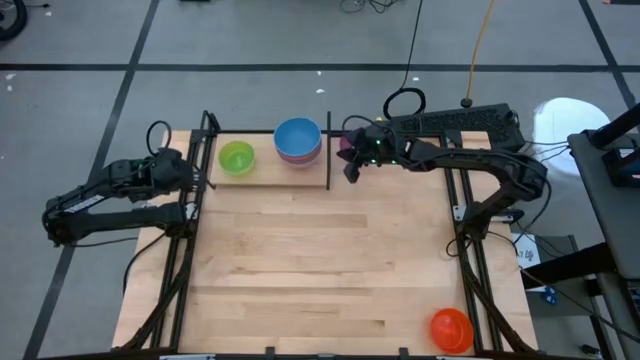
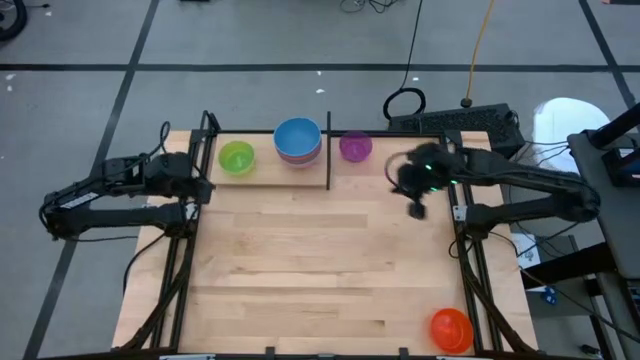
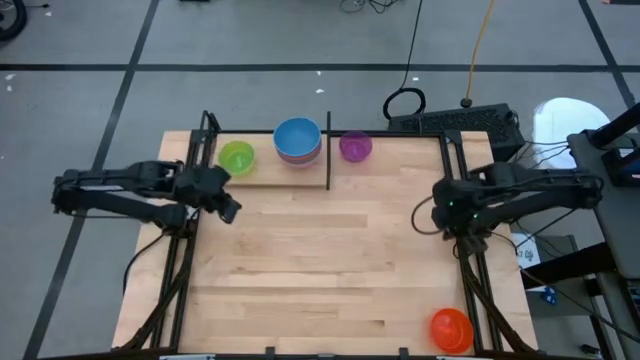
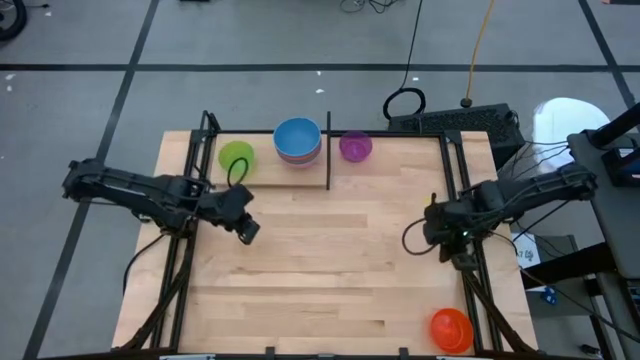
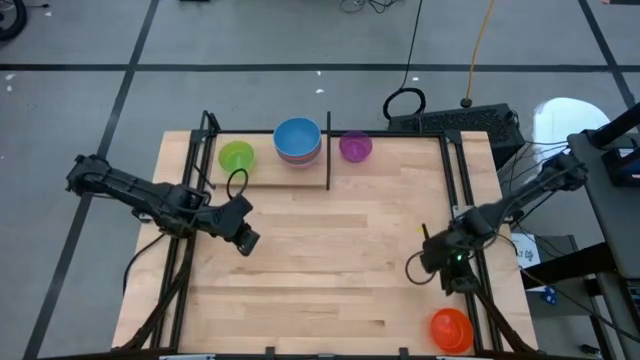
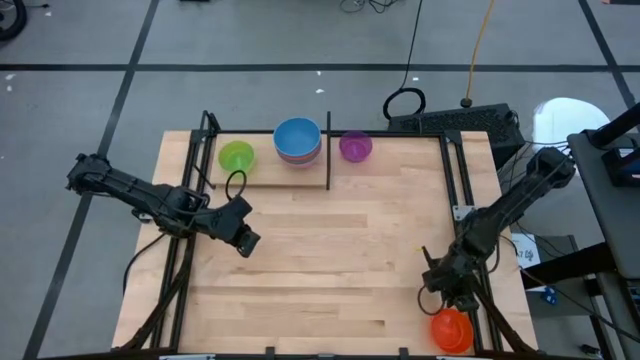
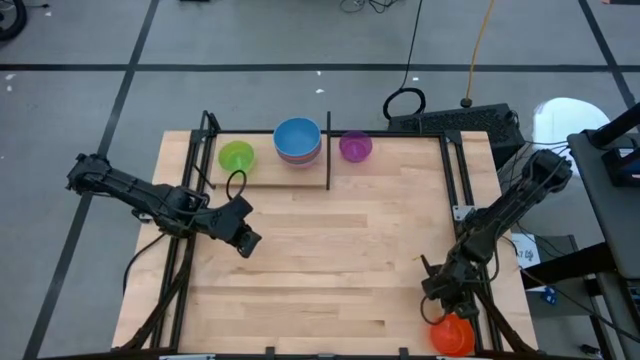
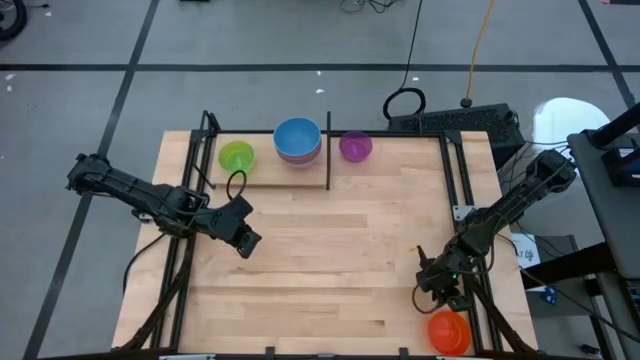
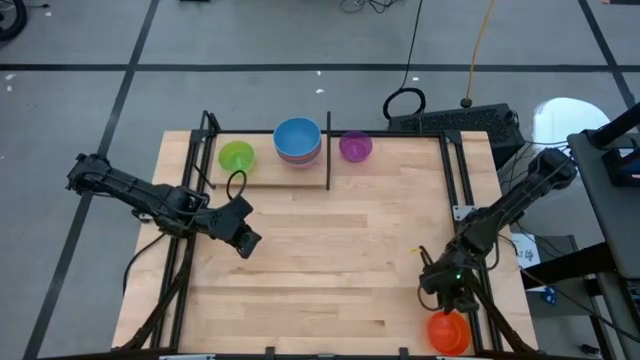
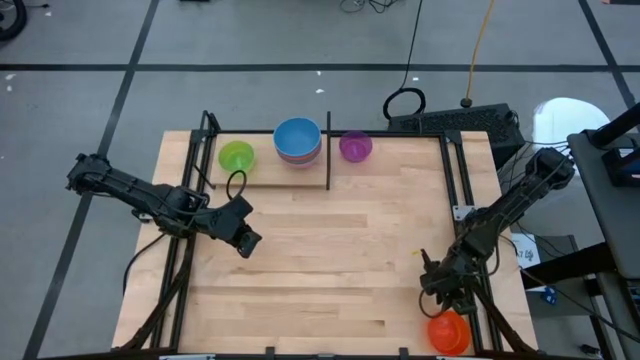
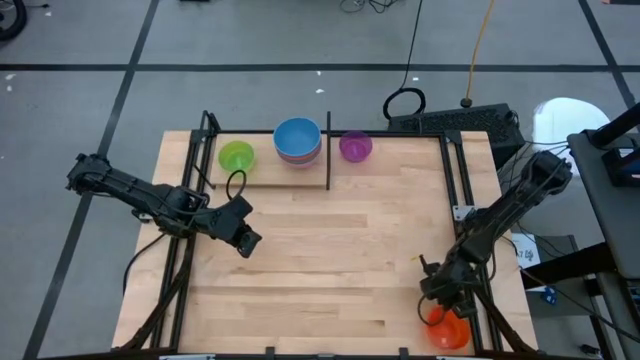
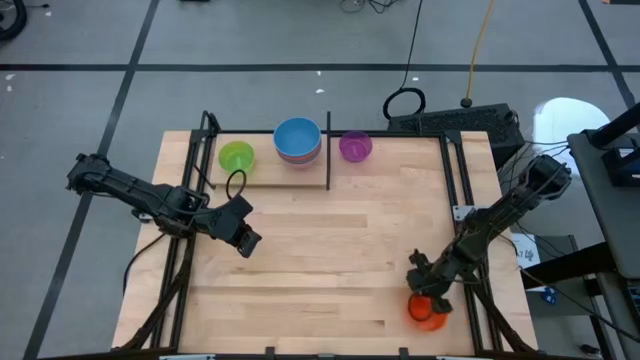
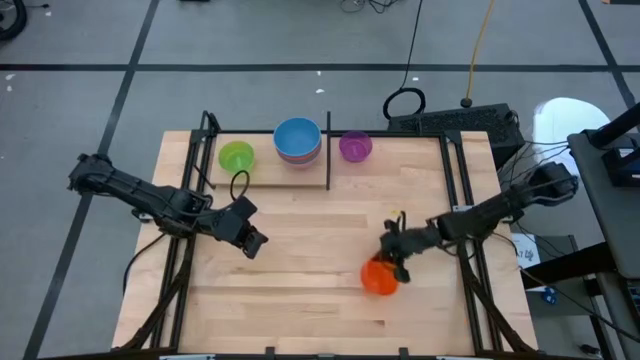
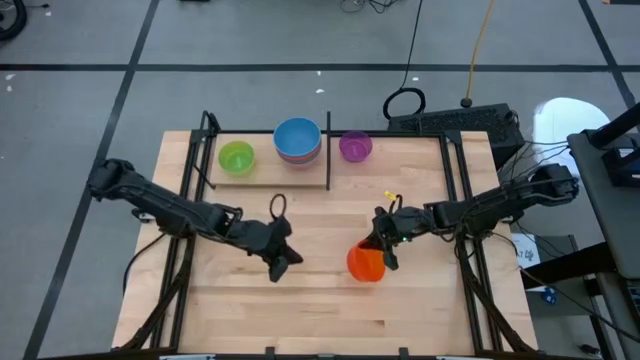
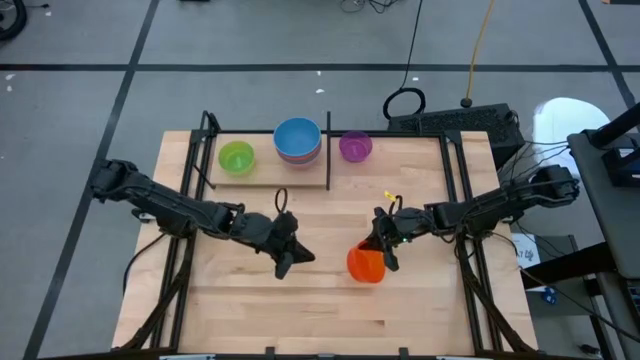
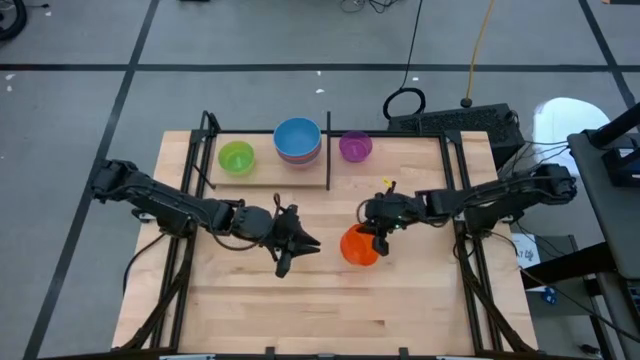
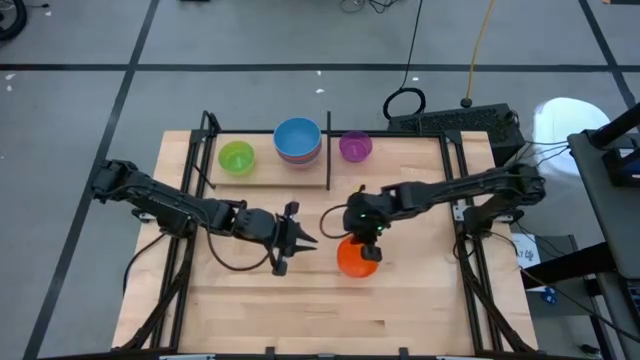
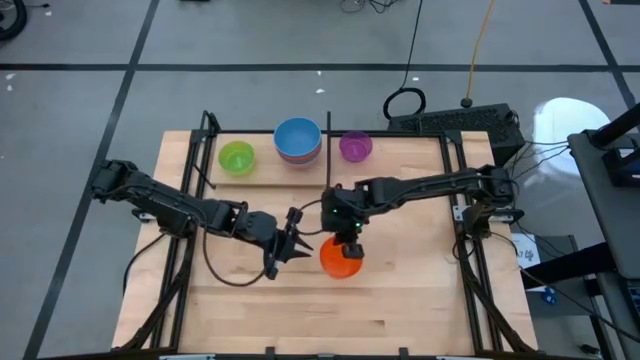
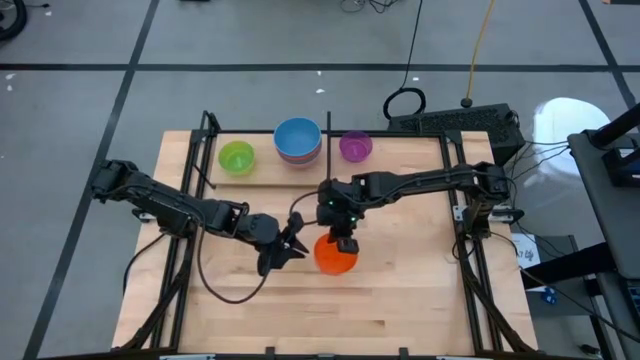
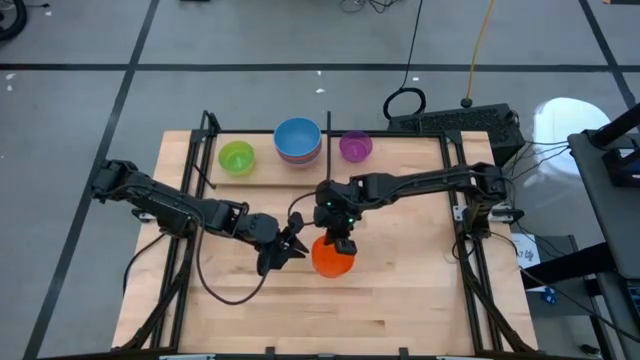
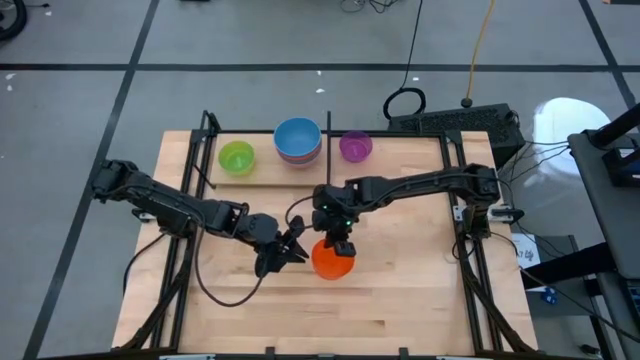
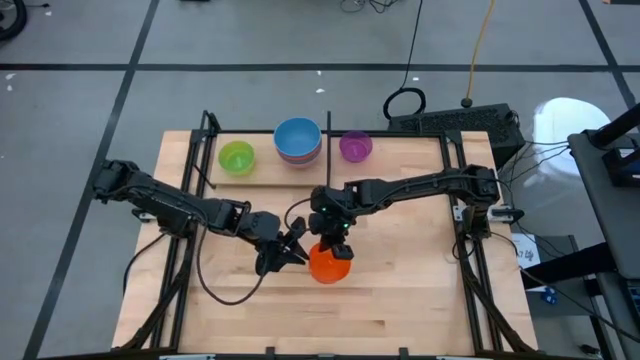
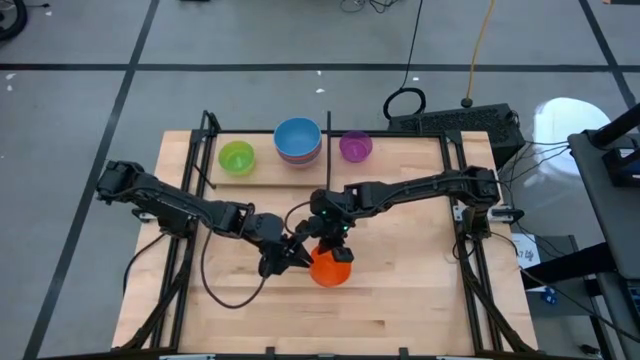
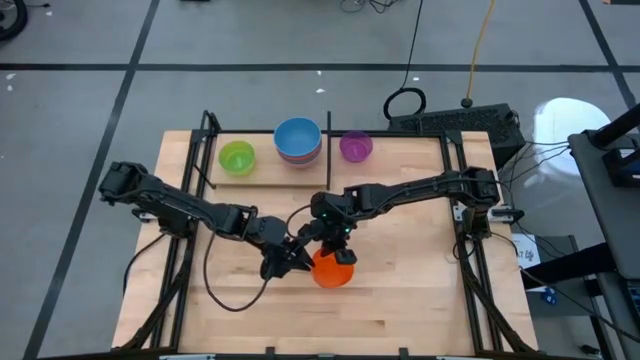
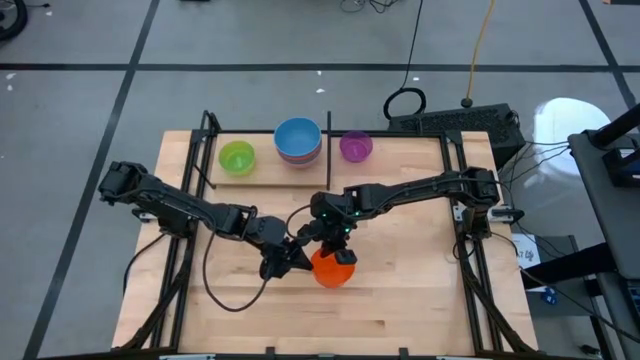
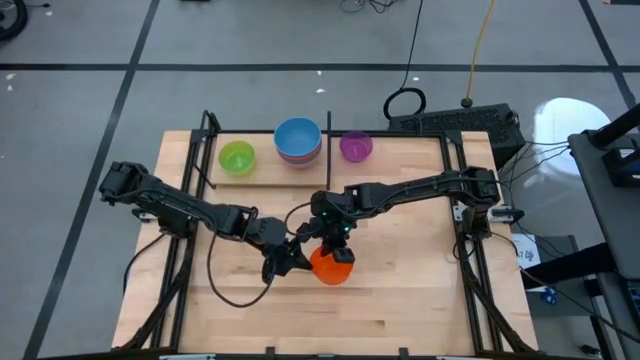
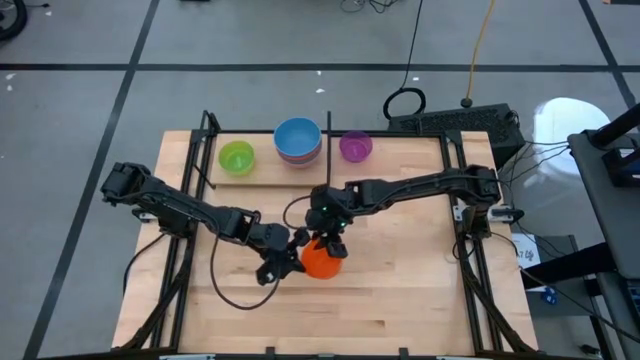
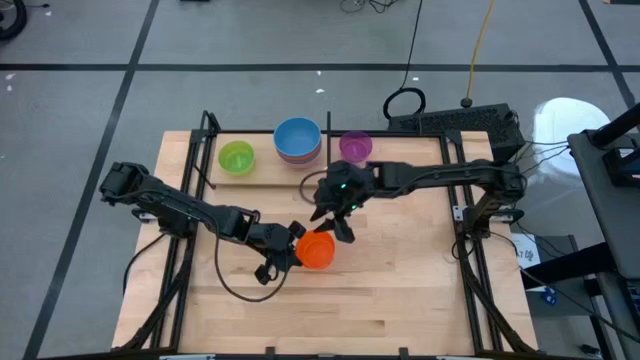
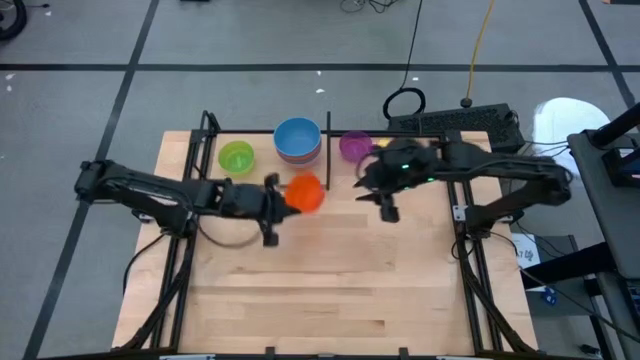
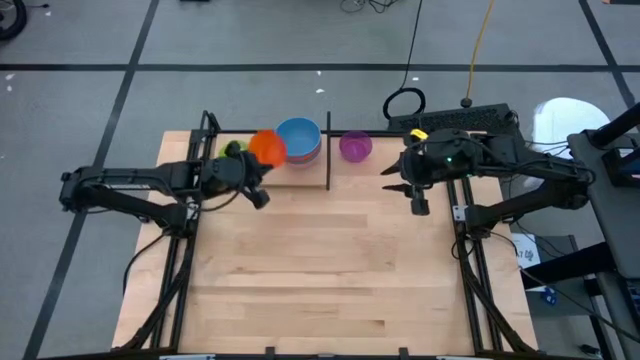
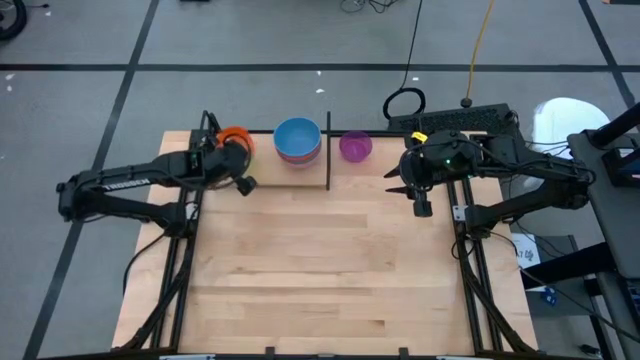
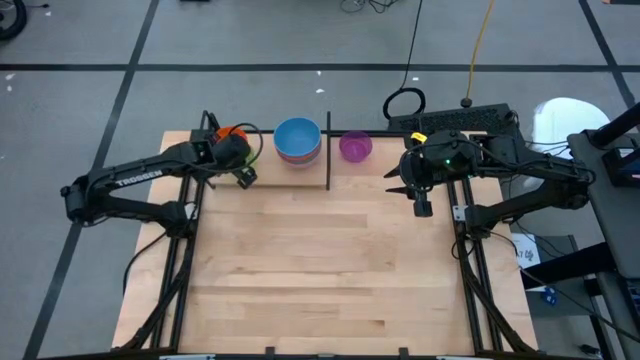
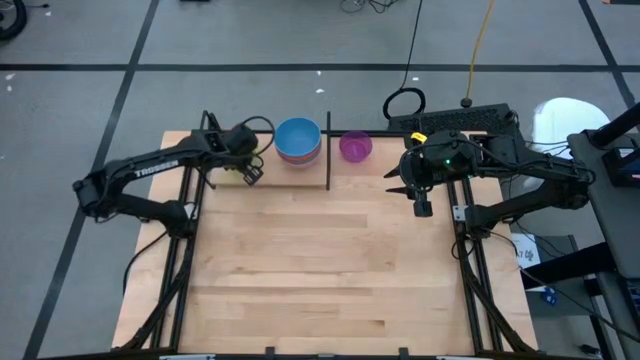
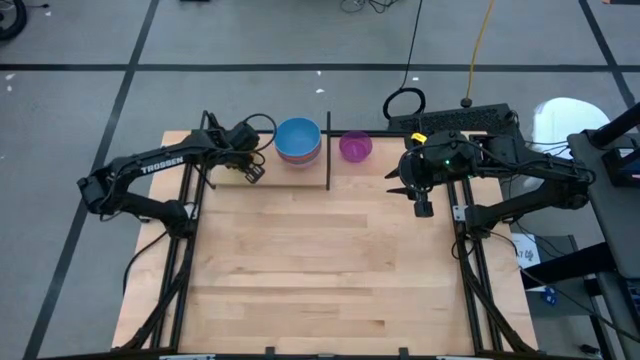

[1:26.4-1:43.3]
Task: Place and stack bowls onto a shelf
Stack the small orange bowl into the green bowl on the shelf

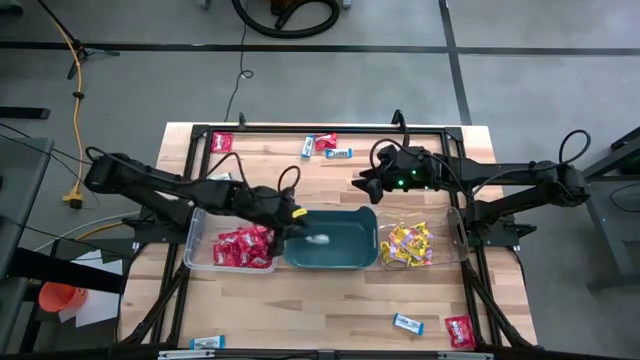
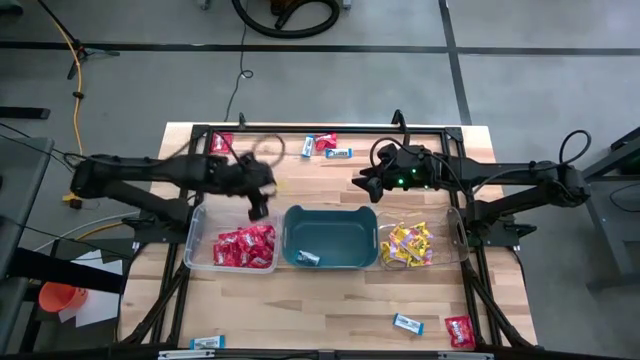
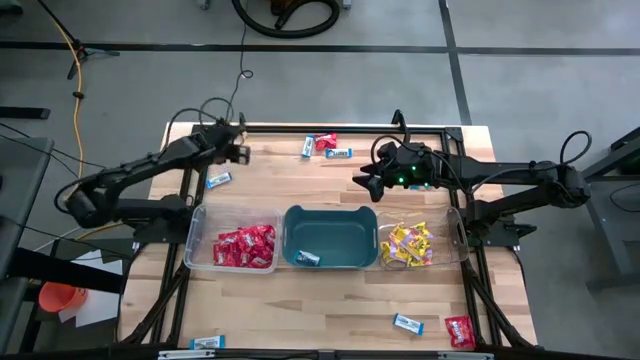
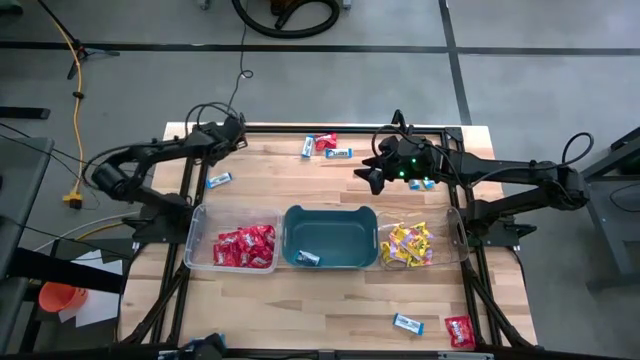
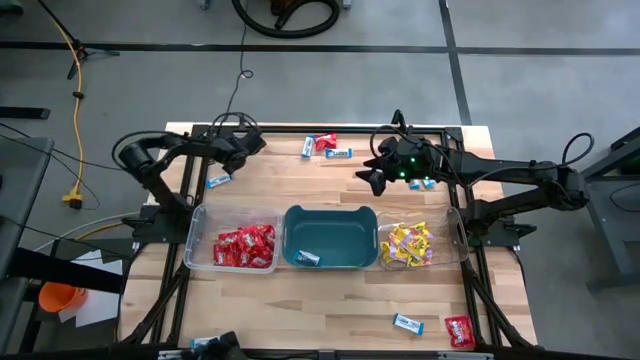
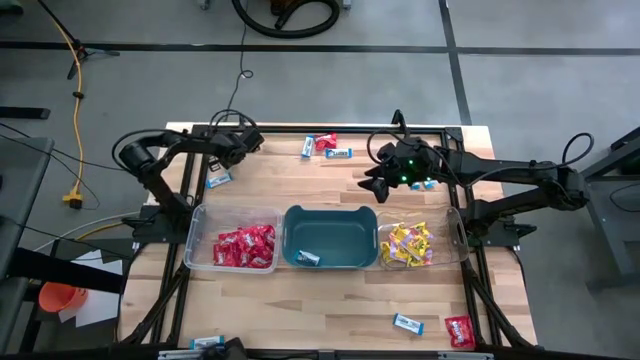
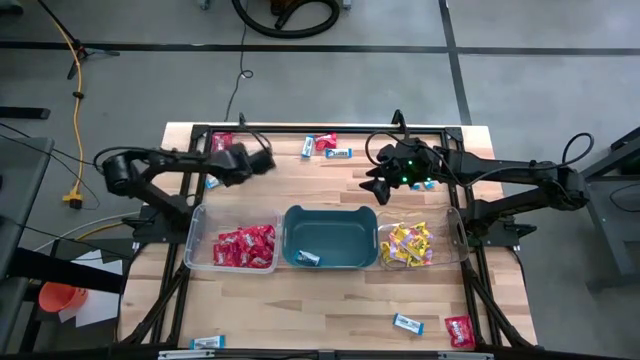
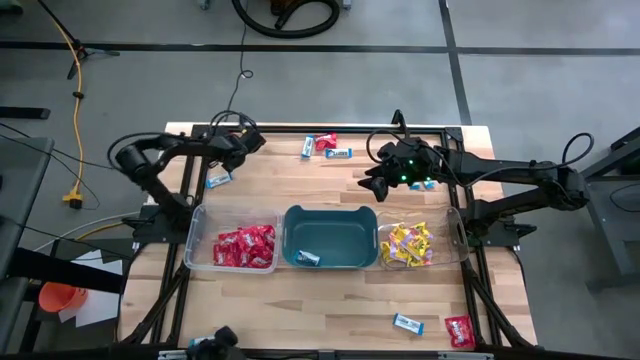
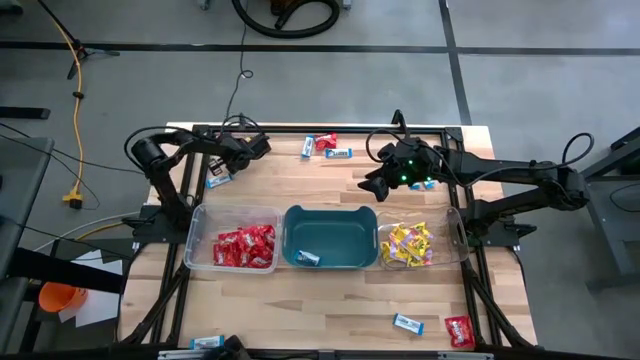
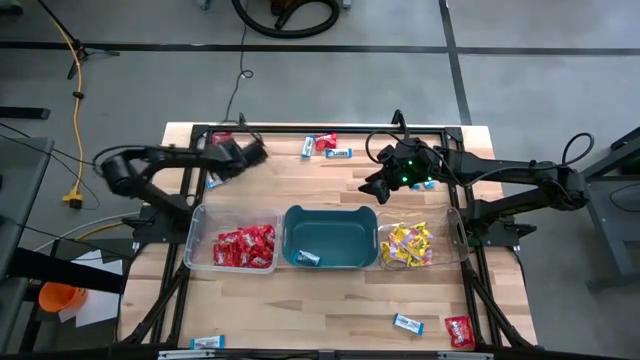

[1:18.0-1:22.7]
Task: Sort candy
Put the red candy into the left transparent bin
